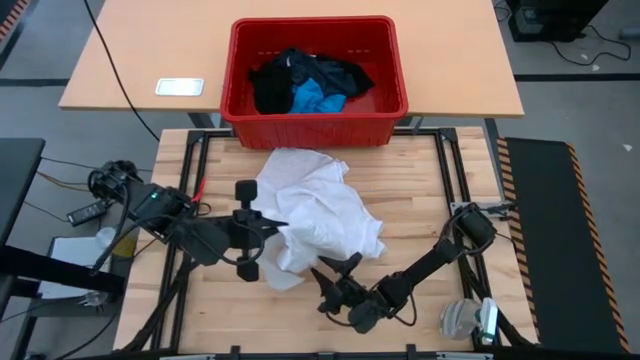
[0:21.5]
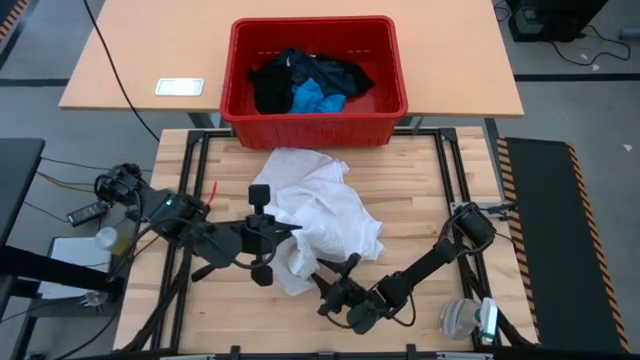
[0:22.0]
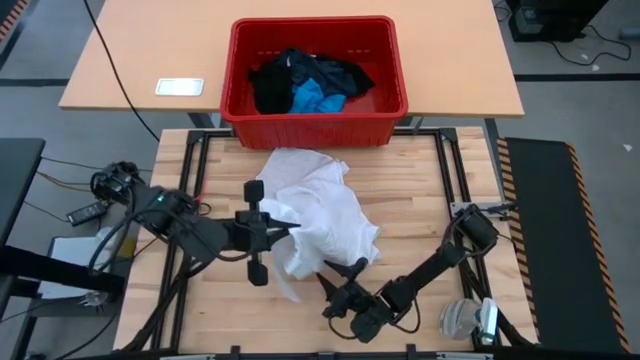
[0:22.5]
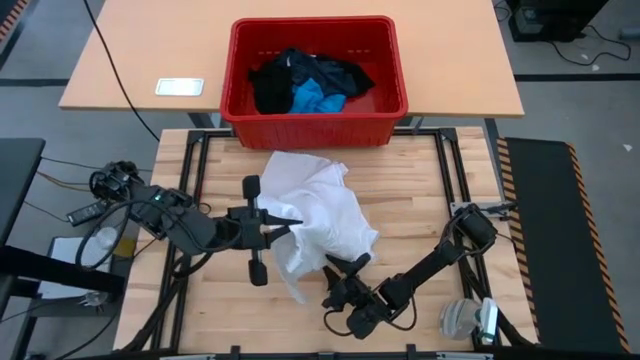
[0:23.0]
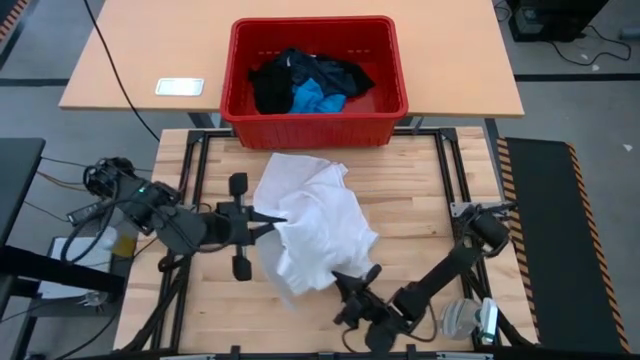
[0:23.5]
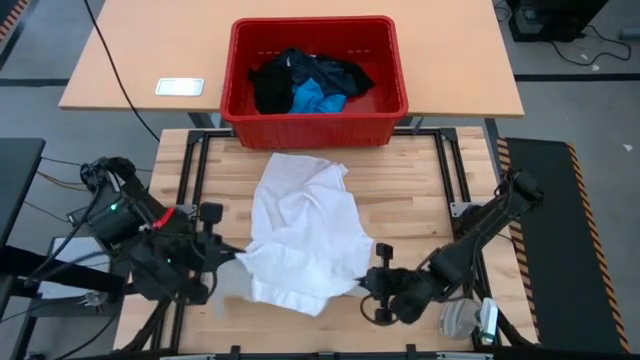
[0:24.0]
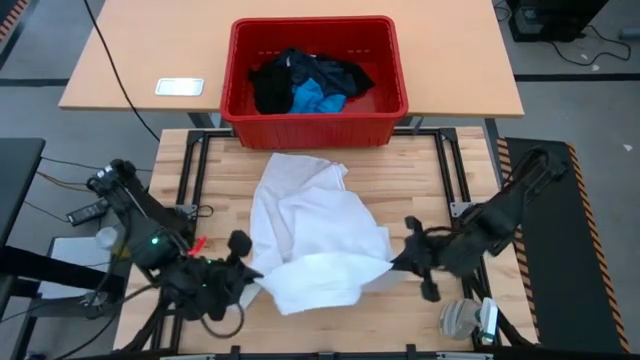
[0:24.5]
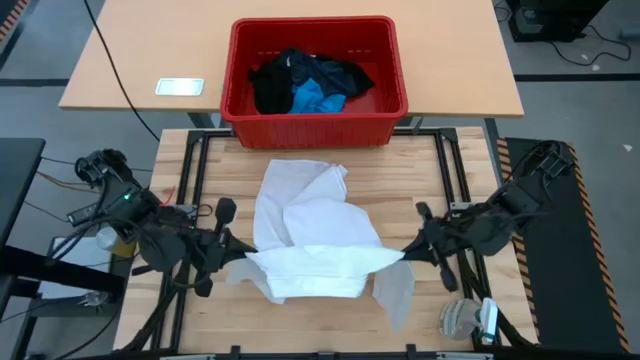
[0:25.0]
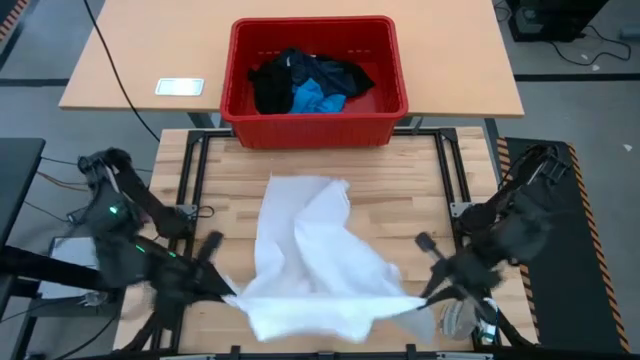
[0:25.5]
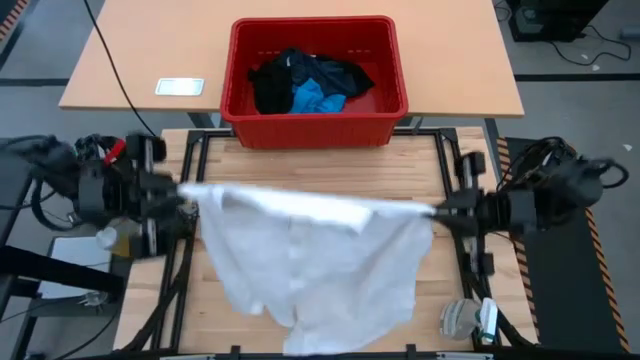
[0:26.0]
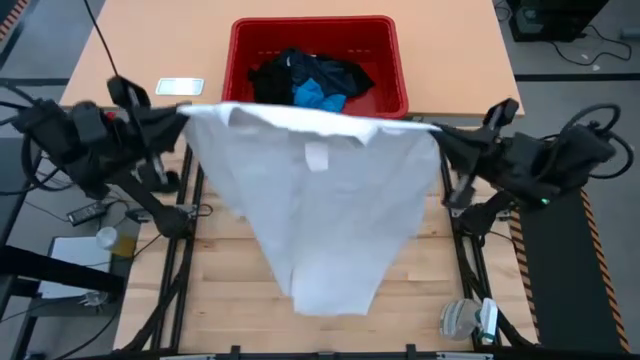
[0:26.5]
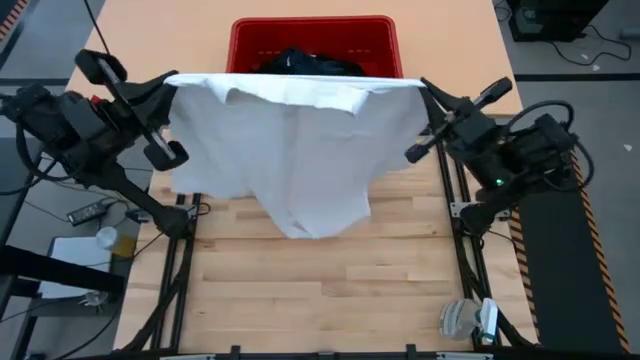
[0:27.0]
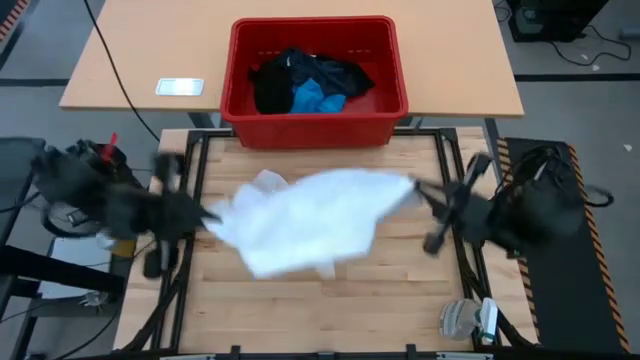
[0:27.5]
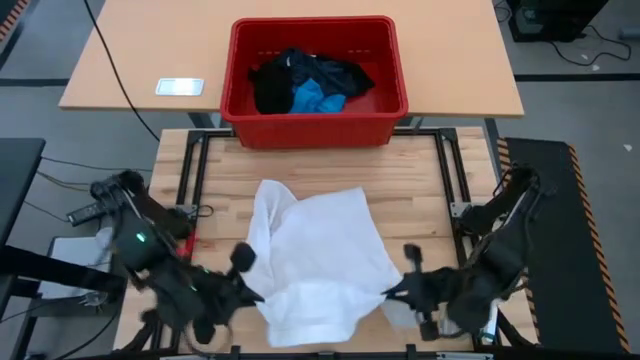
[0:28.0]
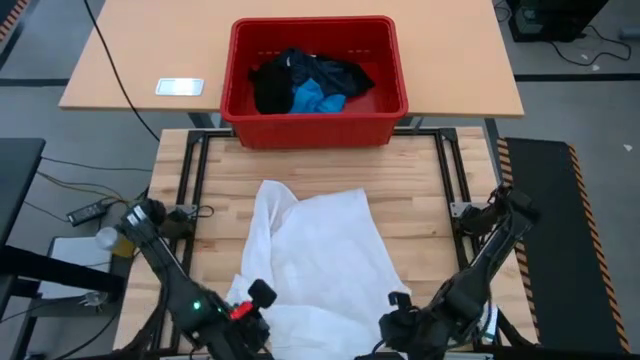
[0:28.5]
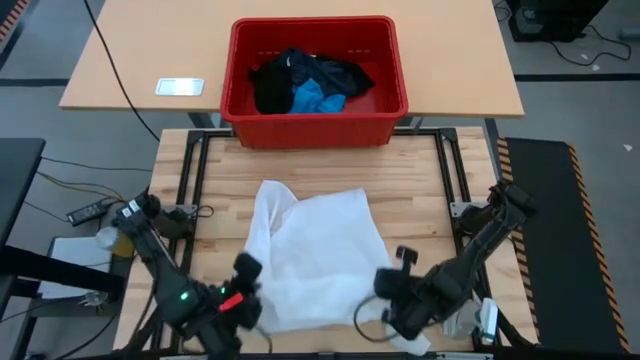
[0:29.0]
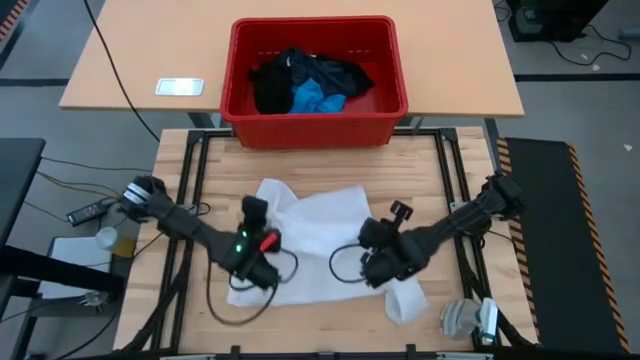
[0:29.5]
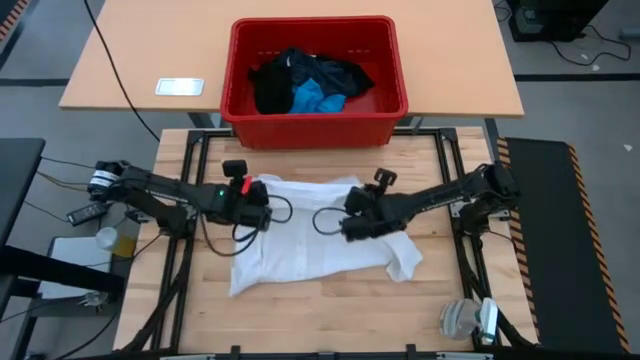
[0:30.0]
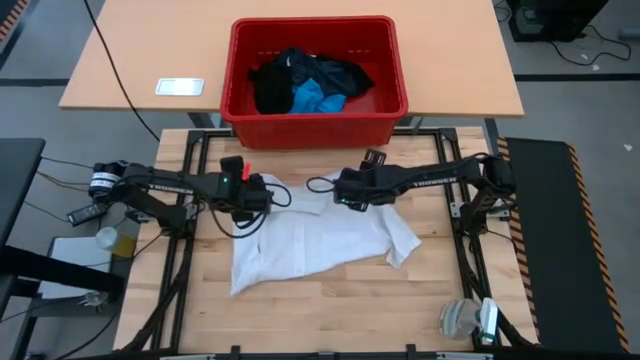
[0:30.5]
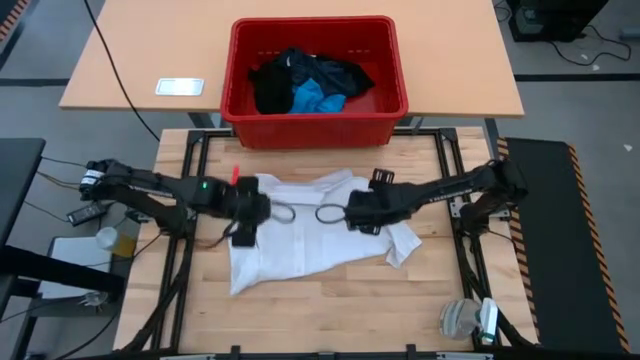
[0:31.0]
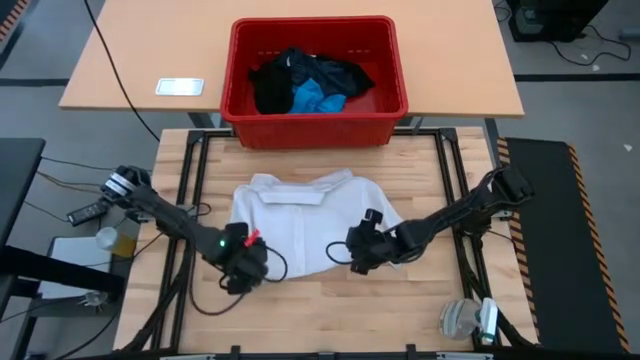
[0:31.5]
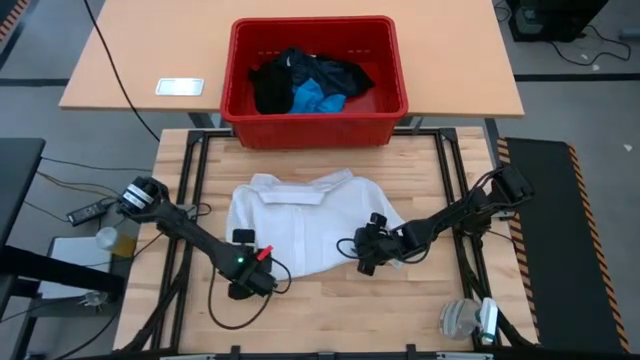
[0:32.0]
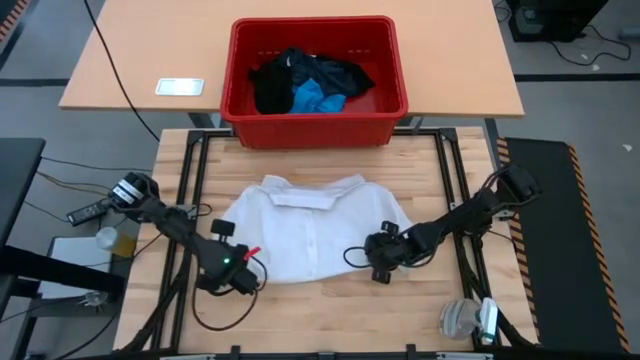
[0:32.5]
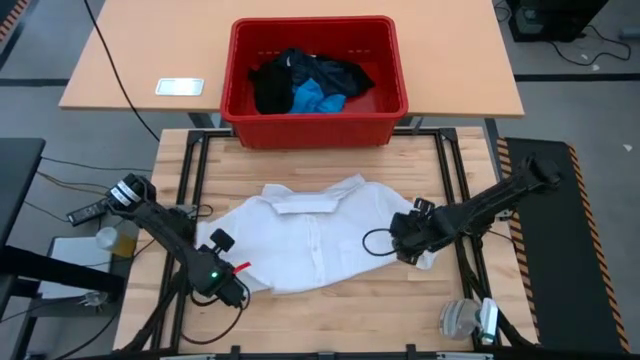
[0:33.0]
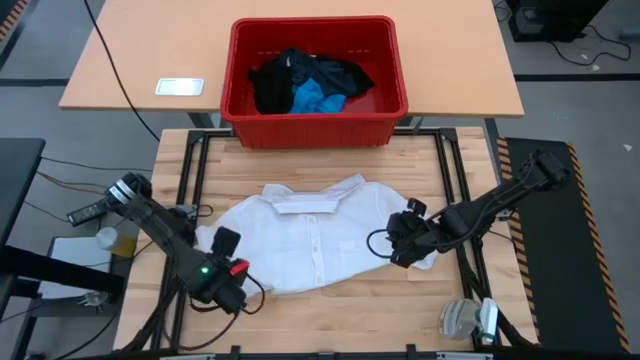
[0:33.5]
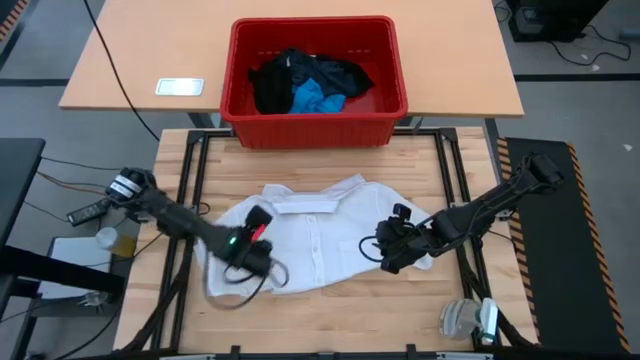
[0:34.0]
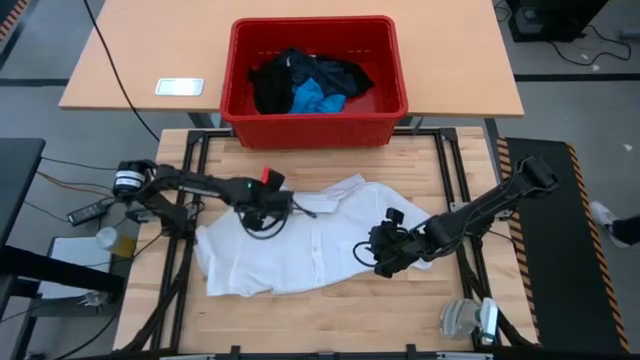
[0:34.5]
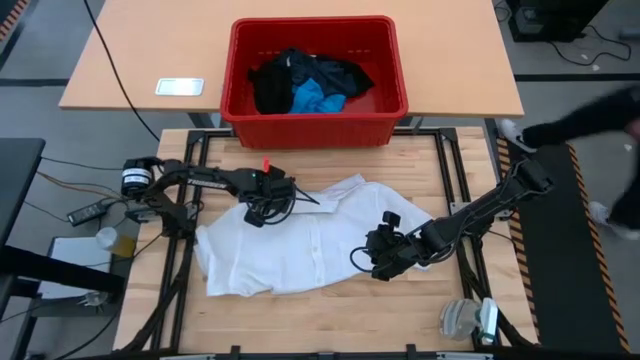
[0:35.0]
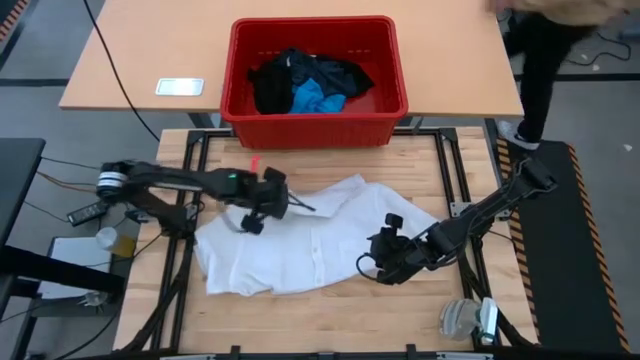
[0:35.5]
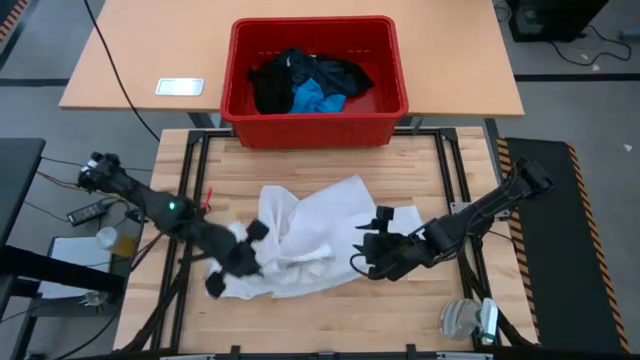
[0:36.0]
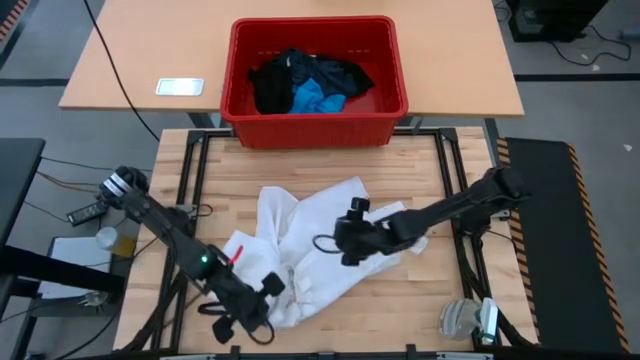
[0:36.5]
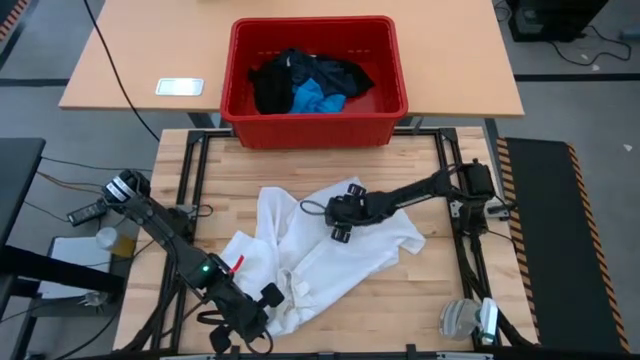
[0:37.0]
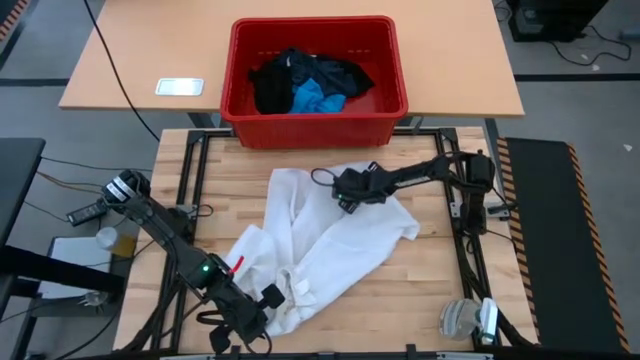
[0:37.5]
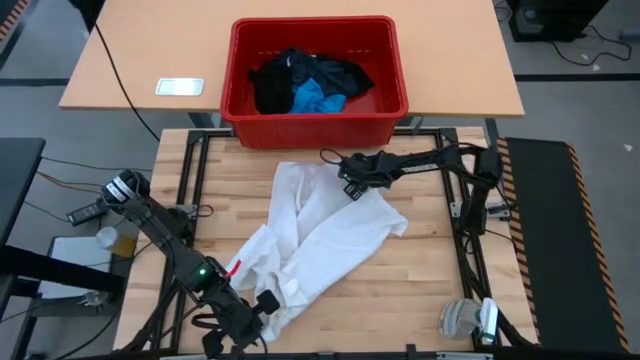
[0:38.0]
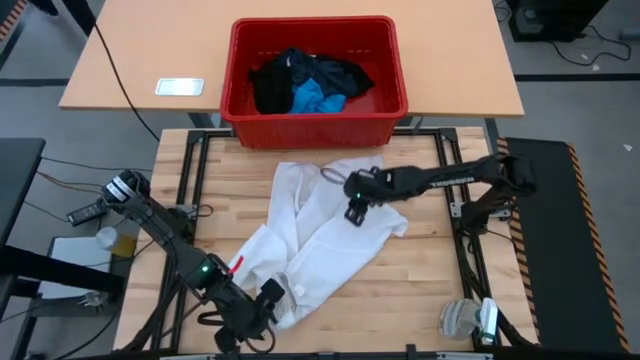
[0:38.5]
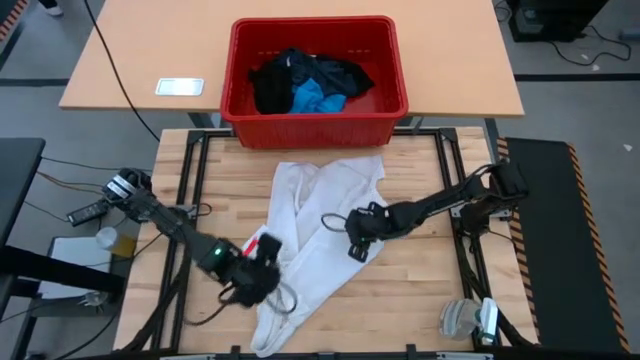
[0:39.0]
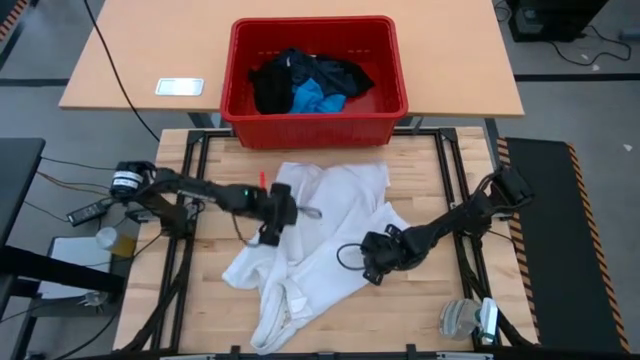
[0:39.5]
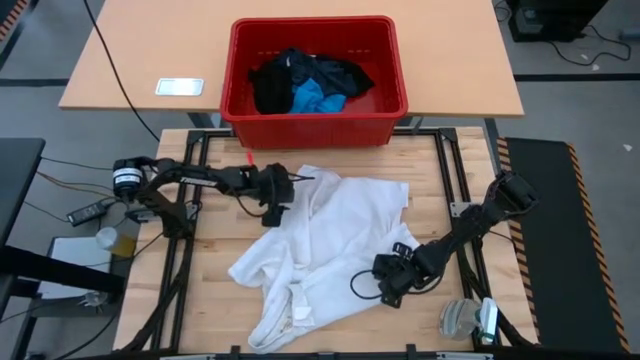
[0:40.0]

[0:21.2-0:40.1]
Task: Fold laundry
Fold the white polo

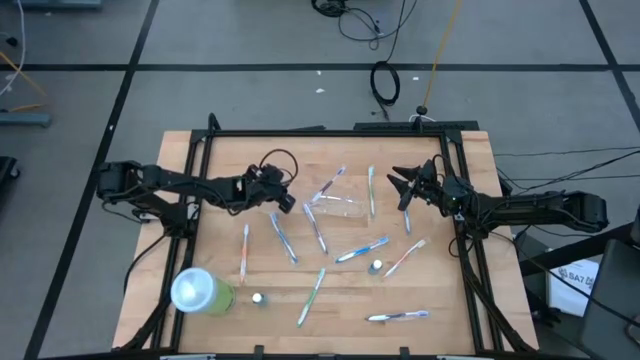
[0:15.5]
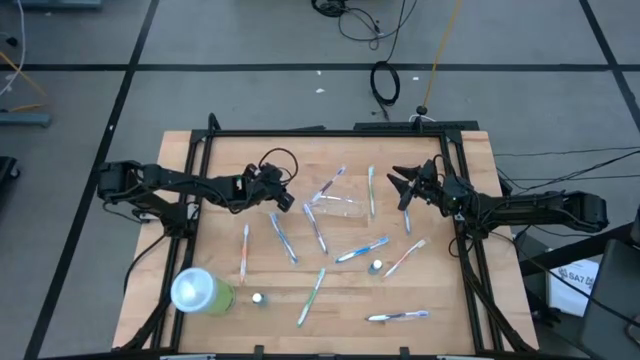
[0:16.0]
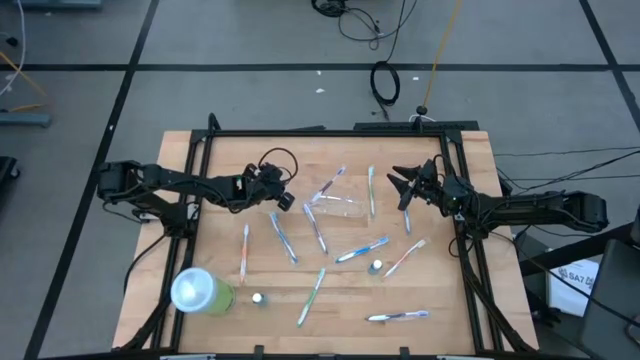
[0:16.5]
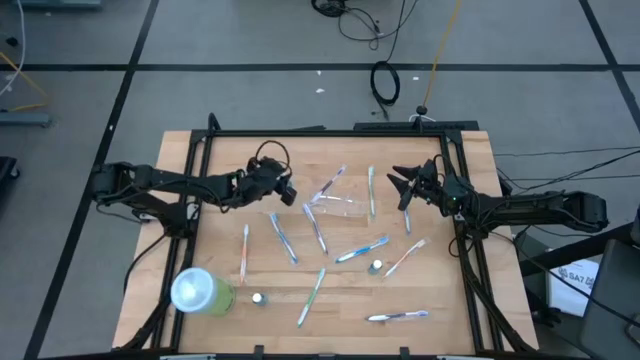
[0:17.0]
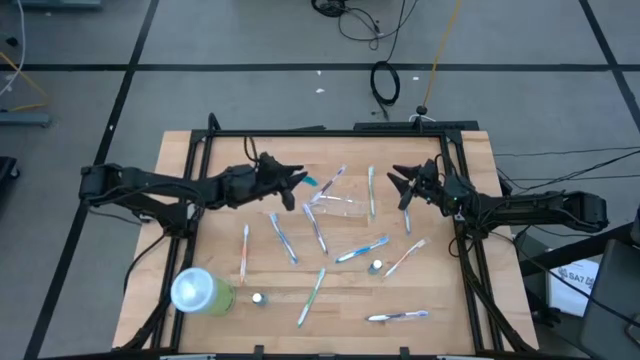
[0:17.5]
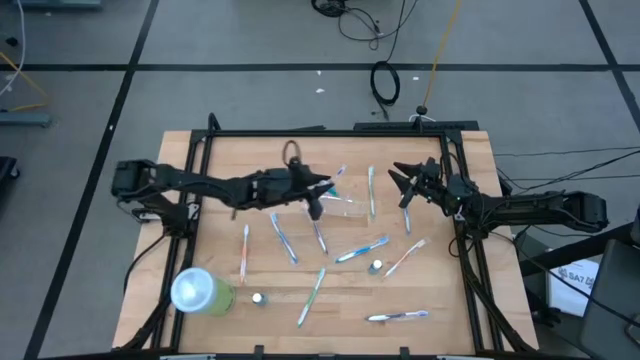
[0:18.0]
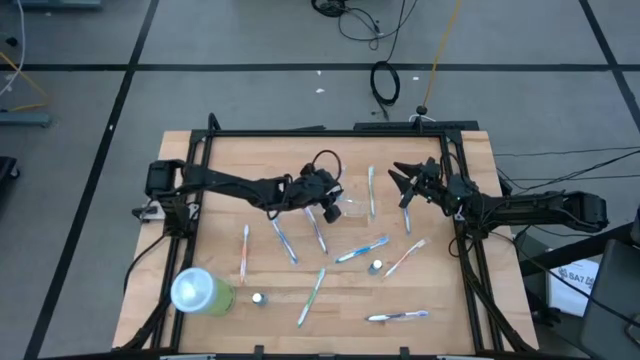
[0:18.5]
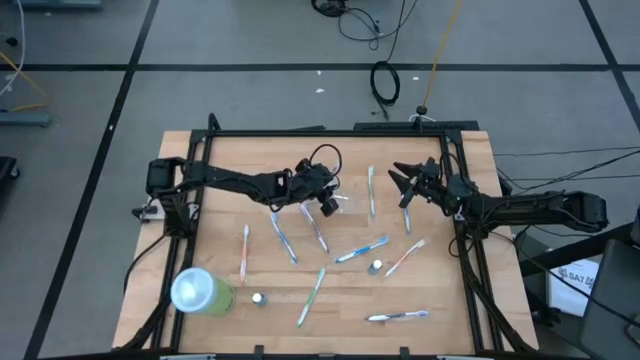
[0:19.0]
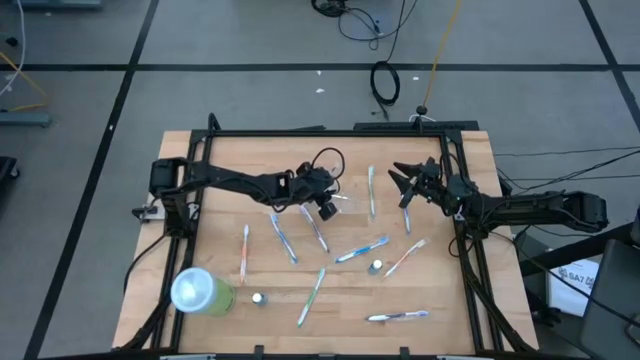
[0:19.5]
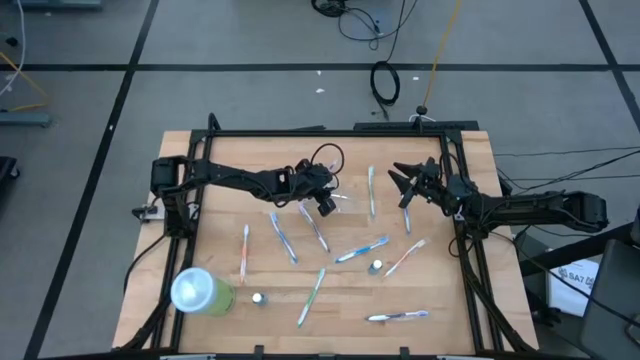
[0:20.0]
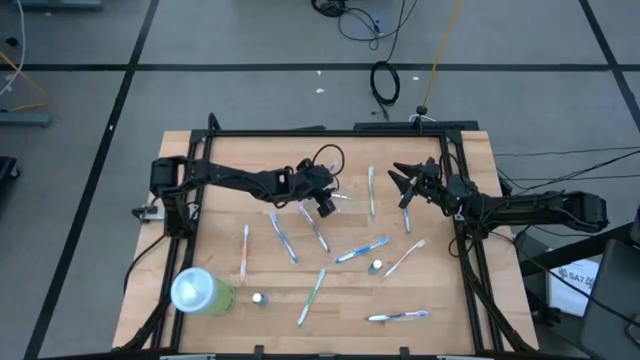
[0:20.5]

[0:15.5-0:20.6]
Task: Pick & Place toothbrushing station
Put the top mouthwash into the transparent organizer
